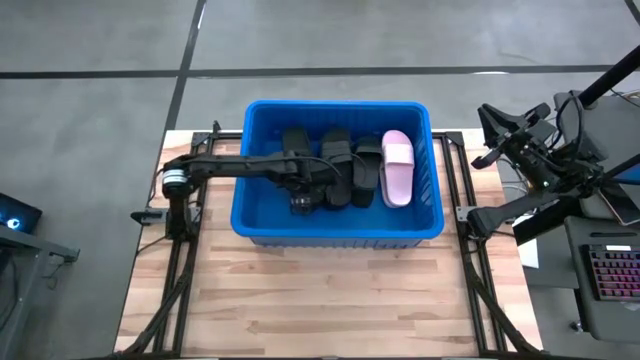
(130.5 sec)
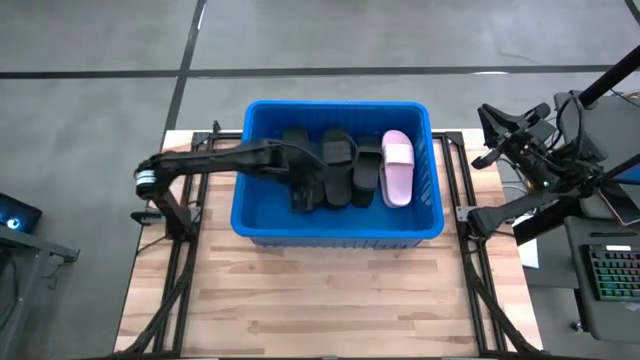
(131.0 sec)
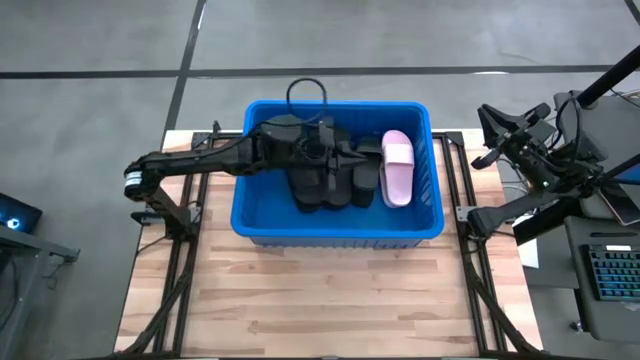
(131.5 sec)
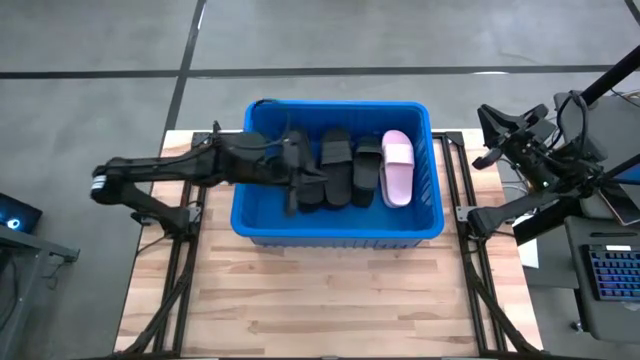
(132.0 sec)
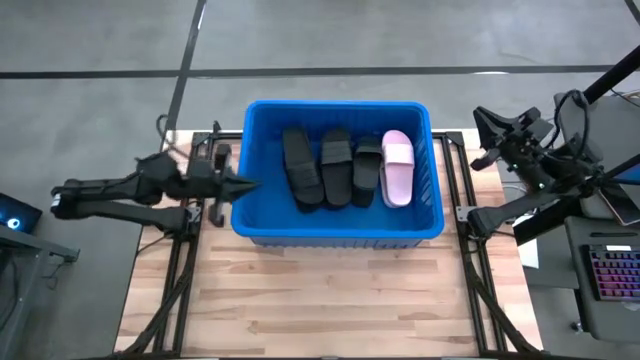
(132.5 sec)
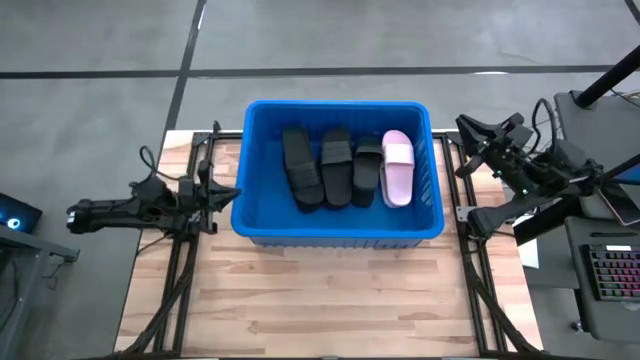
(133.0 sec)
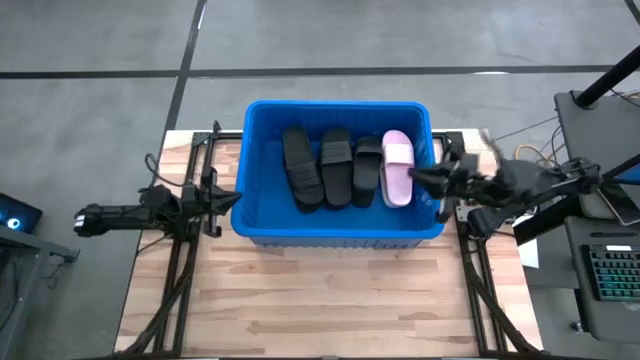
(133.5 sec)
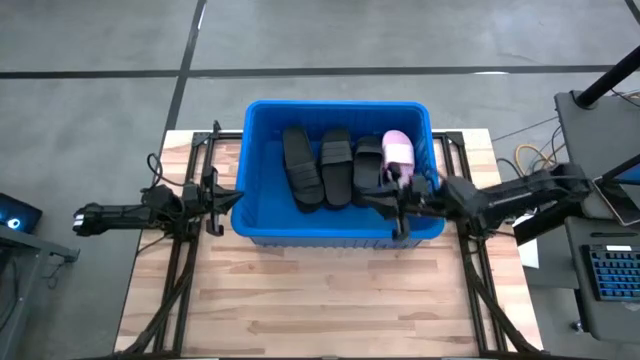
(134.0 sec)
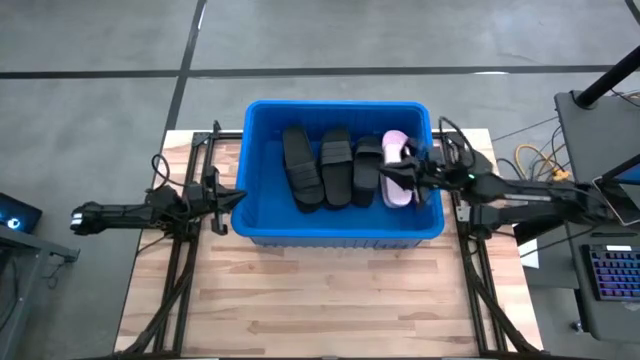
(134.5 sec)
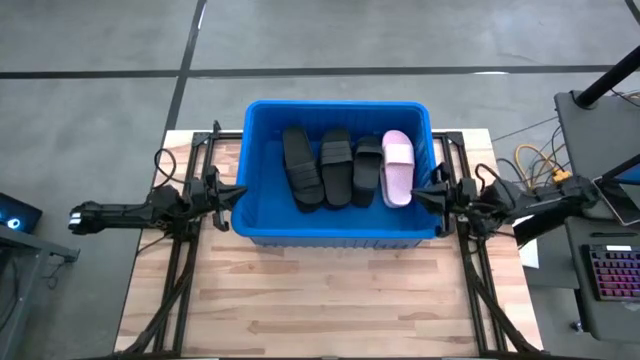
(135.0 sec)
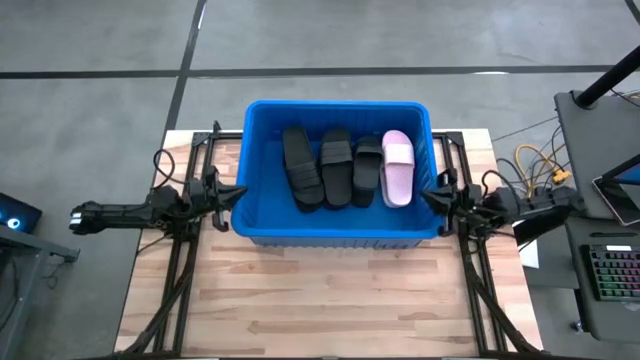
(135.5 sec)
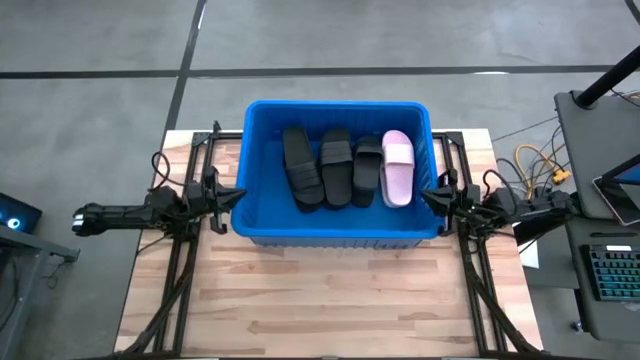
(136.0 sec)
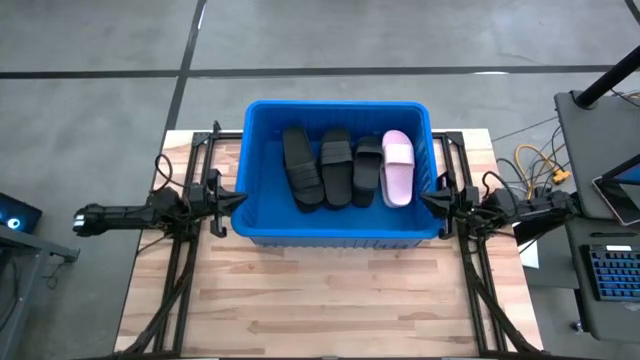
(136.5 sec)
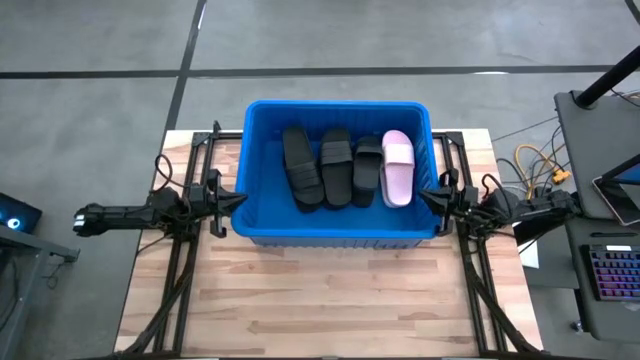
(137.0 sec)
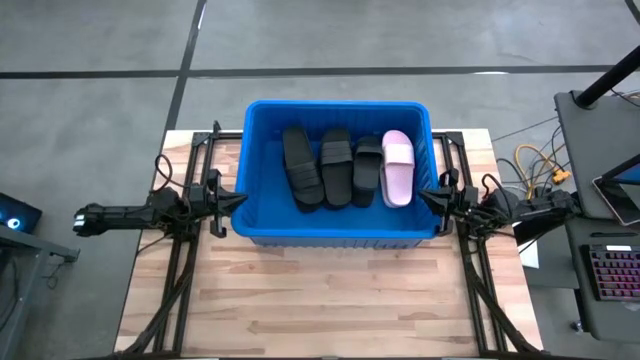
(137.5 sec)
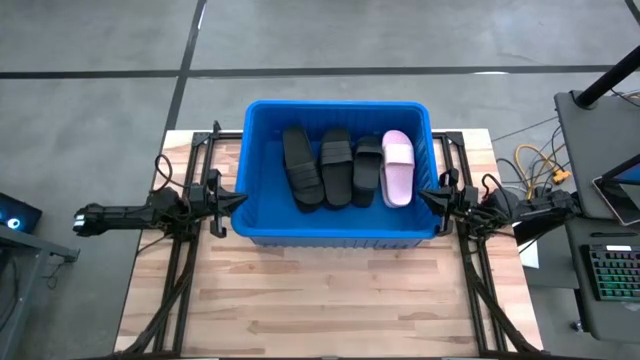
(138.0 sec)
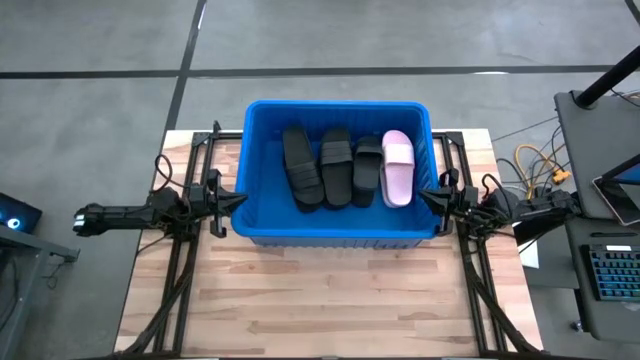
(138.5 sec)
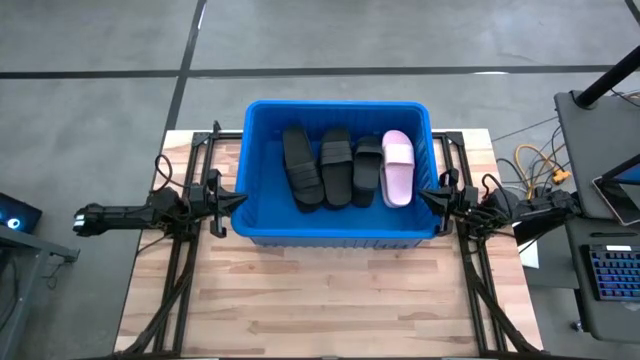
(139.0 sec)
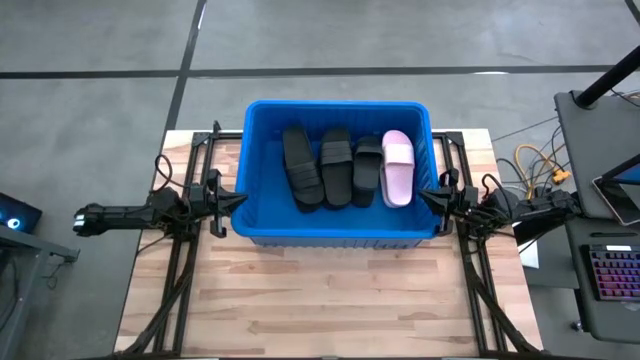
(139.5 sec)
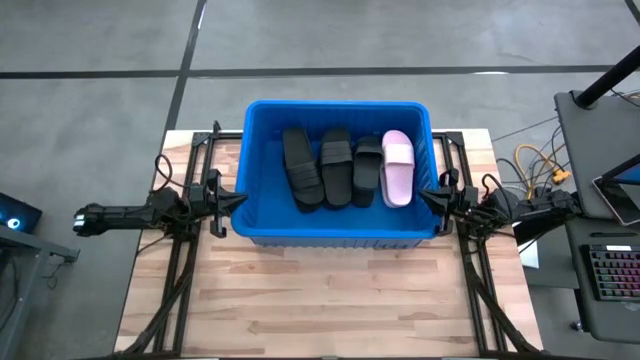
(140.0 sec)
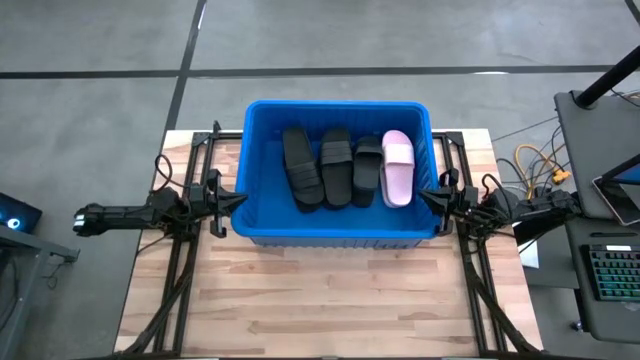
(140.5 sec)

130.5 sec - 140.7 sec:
Task: Pick and place slides into bin
Return to Home Position

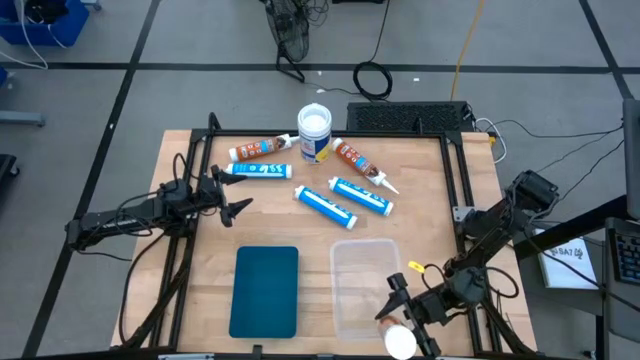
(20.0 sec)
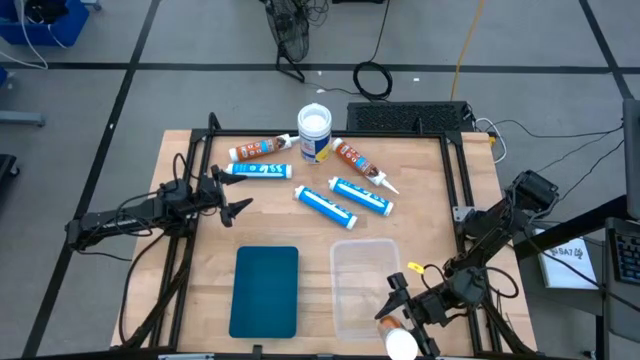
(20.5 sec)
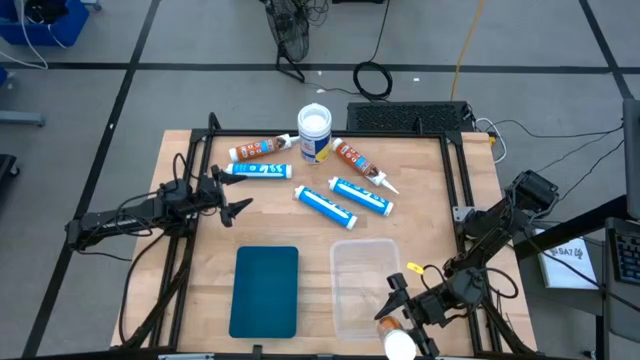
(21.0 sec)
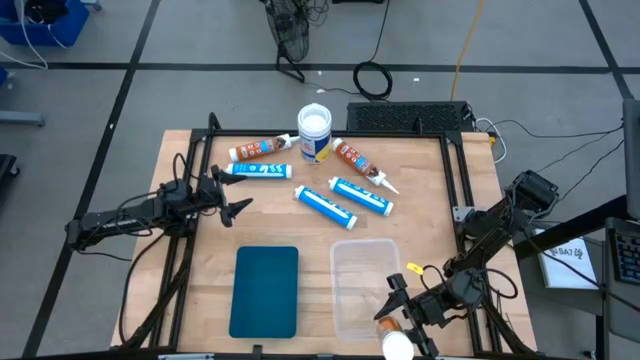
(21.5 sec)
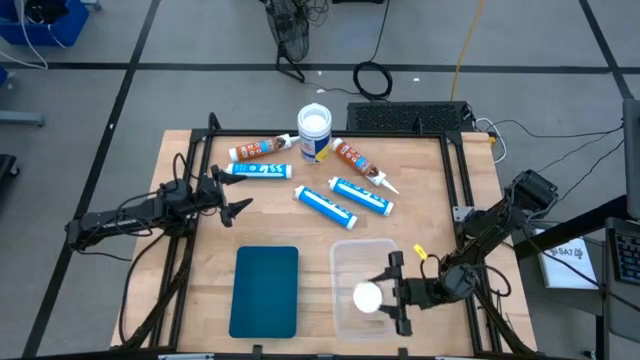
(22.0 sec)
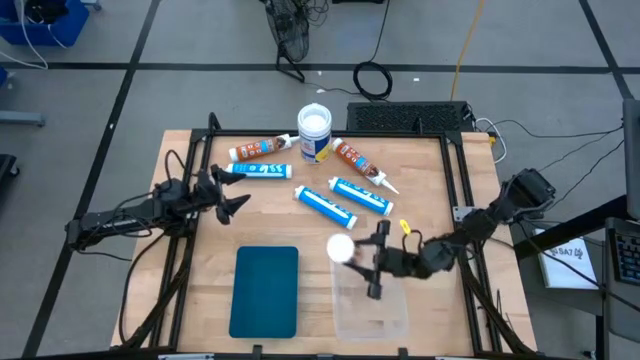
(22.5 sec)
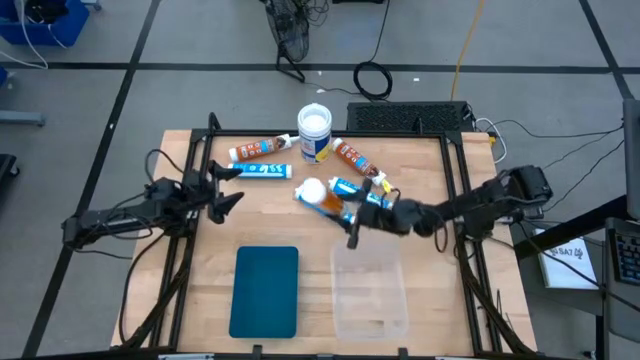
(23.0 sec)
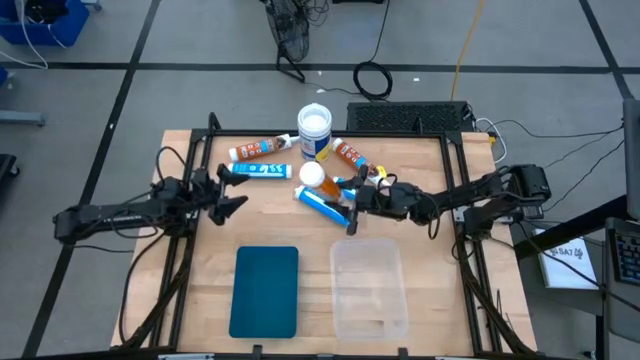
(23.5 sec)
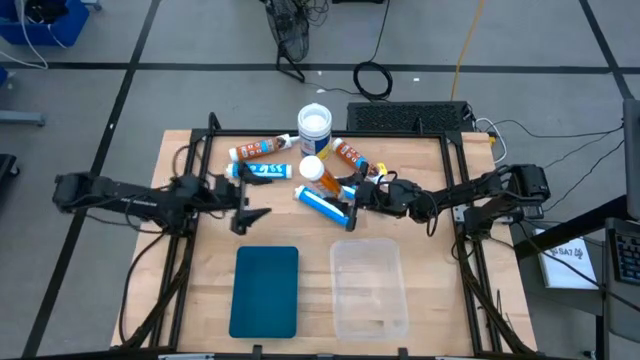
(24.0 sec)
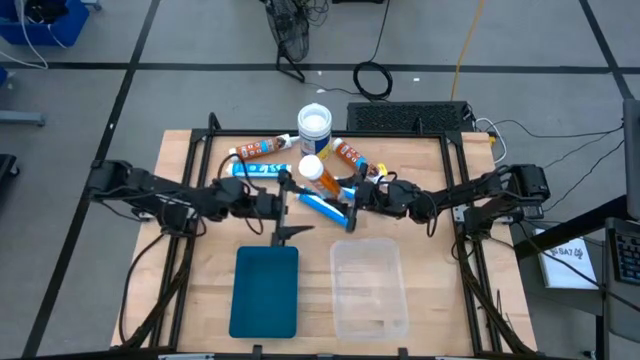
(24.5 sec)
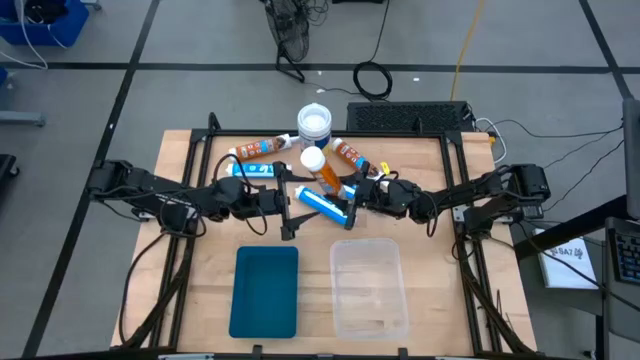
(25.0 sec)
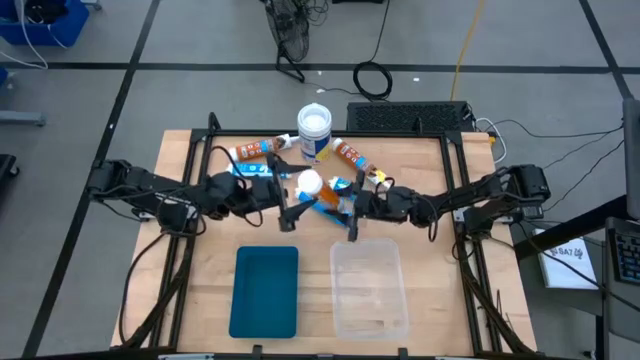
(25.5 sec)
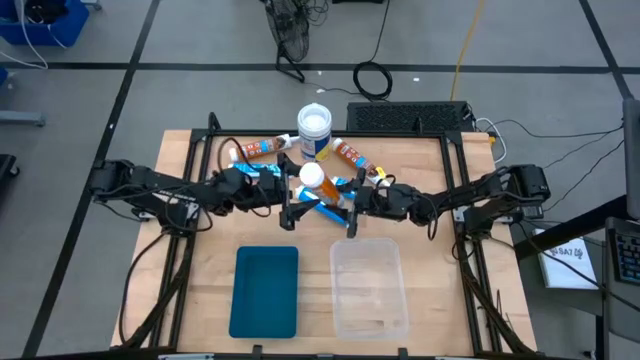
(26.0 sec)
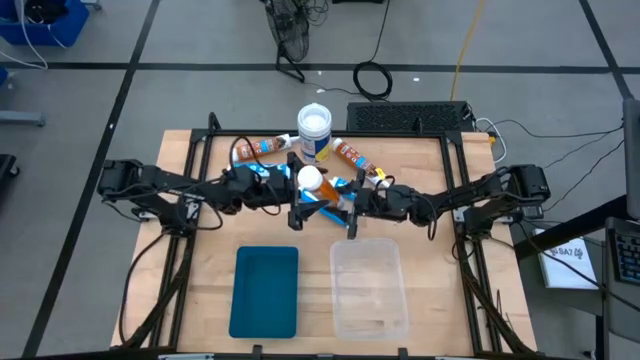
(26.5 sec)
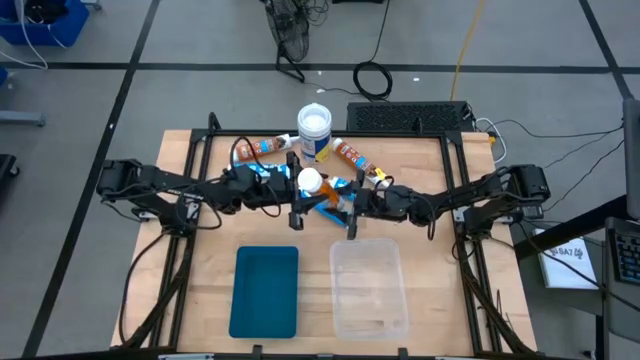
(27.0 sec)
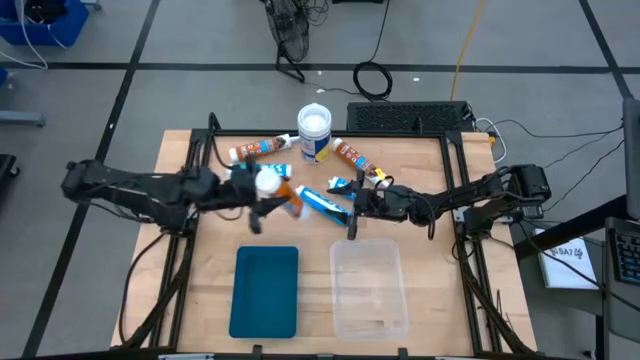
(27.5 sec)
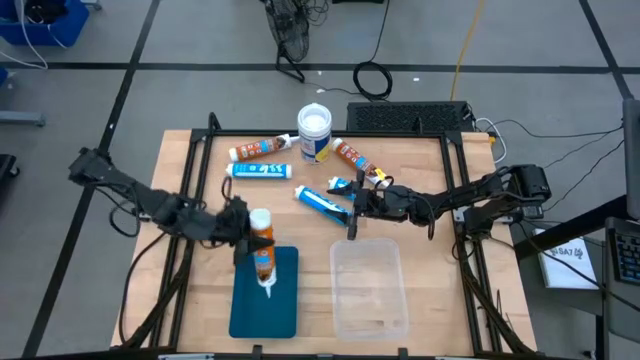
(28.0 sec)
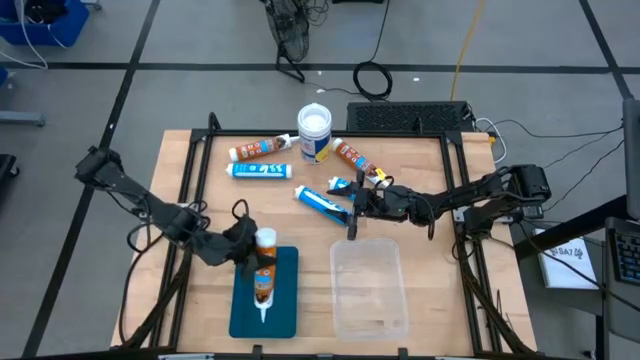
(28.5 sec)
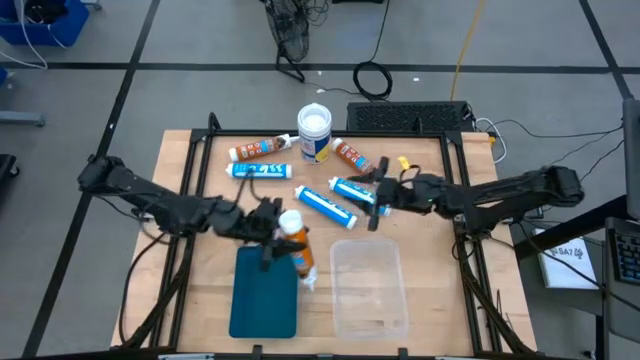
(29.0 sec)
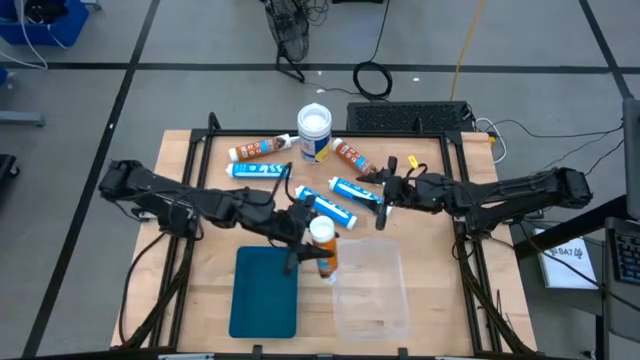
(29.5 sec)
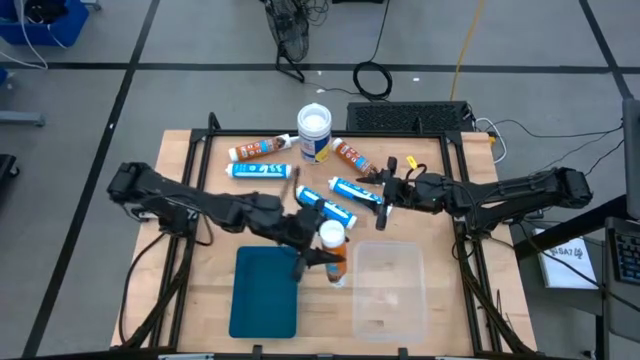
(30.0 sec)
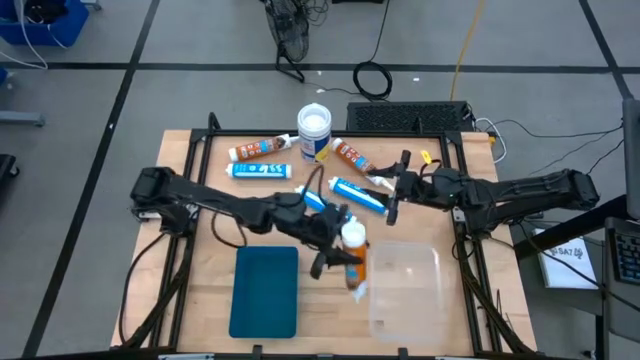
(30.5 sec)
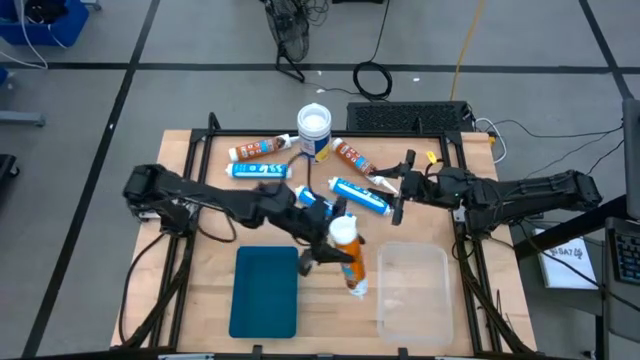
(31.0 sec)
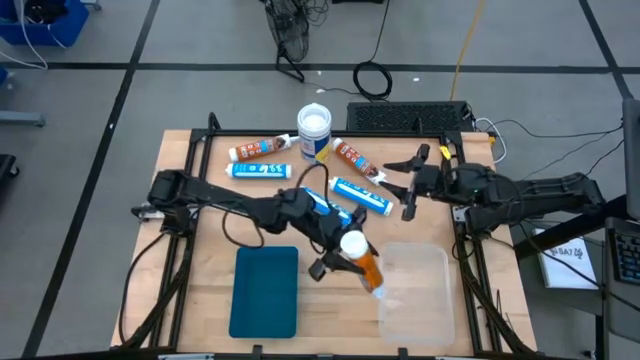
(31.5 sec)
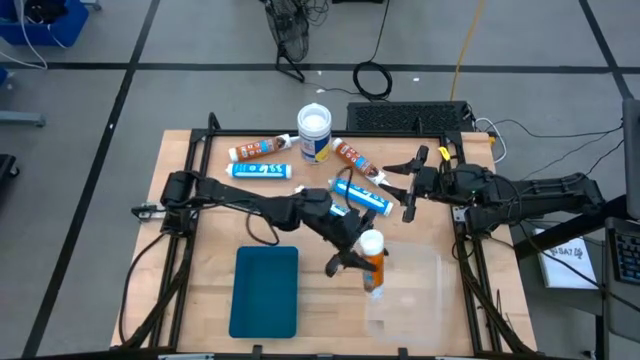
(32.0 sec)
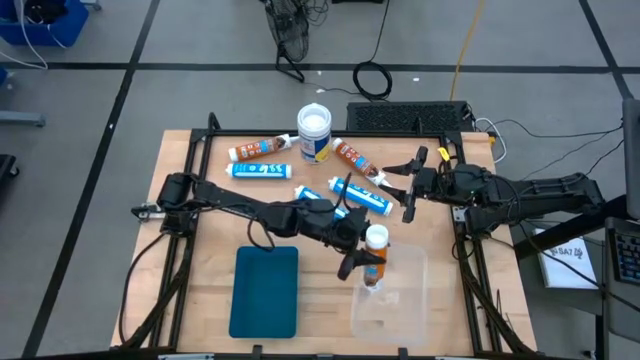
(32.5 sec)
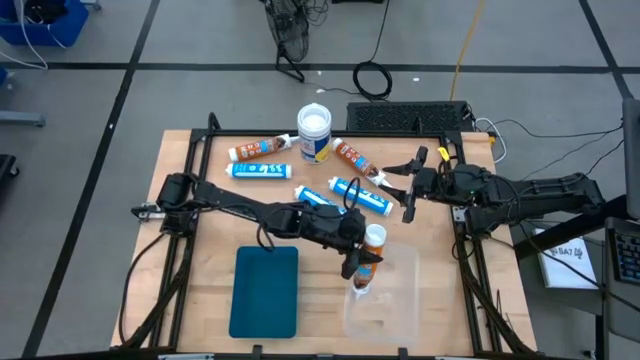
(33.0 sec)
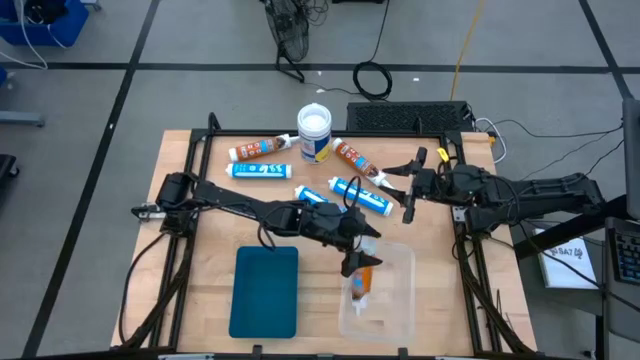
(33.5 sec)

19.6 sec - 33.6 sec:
Task: Pick & place silicon tubes, Sealant and Lysol wipes
Put the right orange sealant into the white bin
